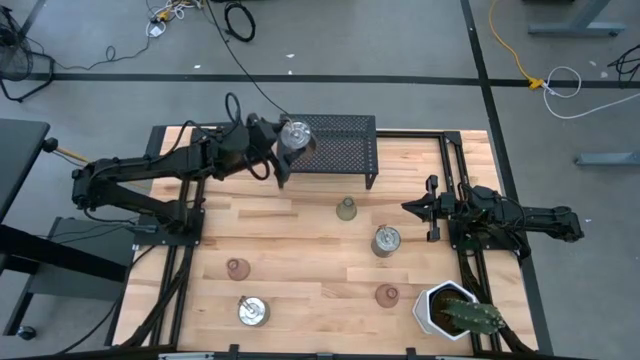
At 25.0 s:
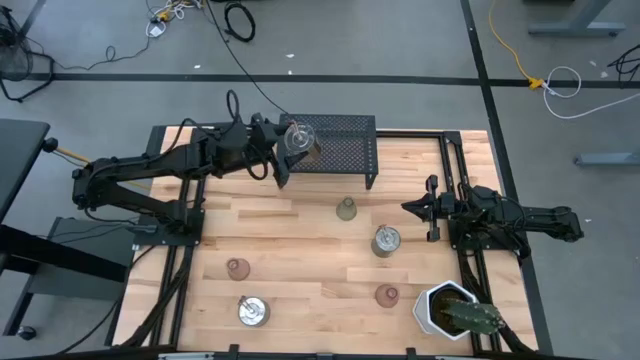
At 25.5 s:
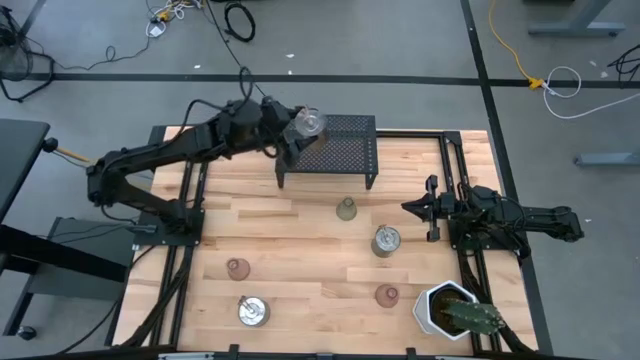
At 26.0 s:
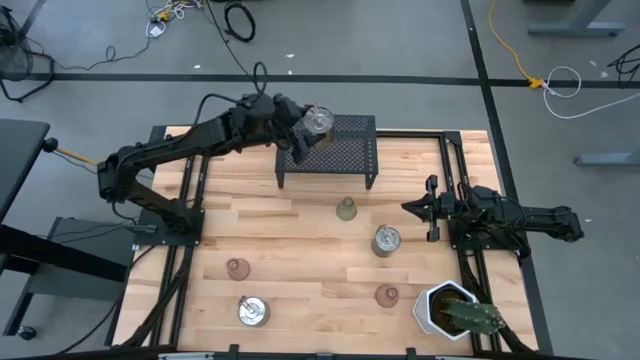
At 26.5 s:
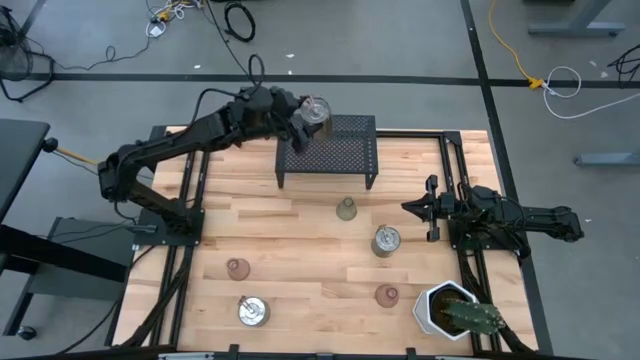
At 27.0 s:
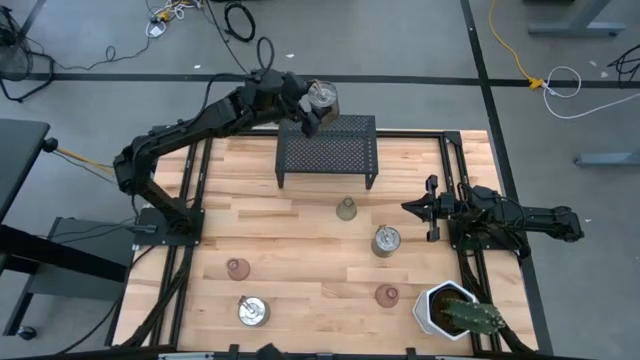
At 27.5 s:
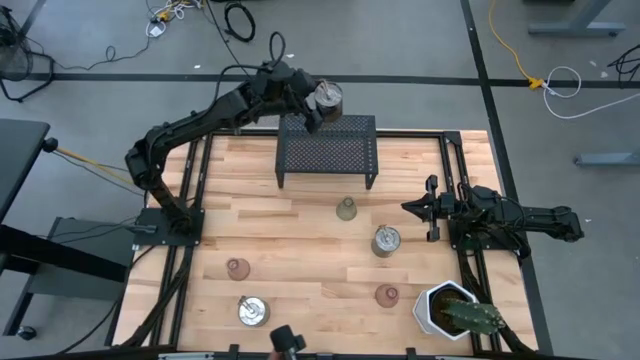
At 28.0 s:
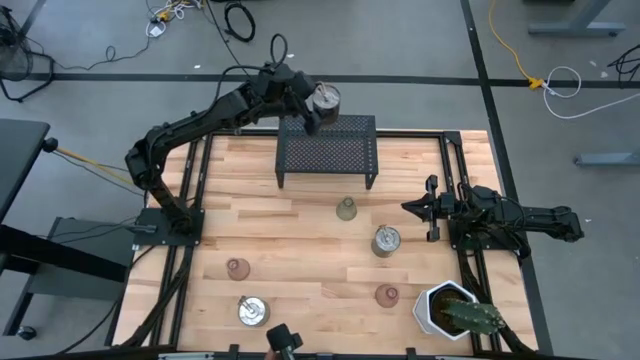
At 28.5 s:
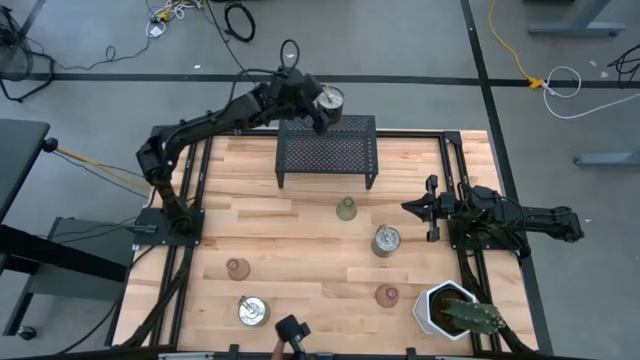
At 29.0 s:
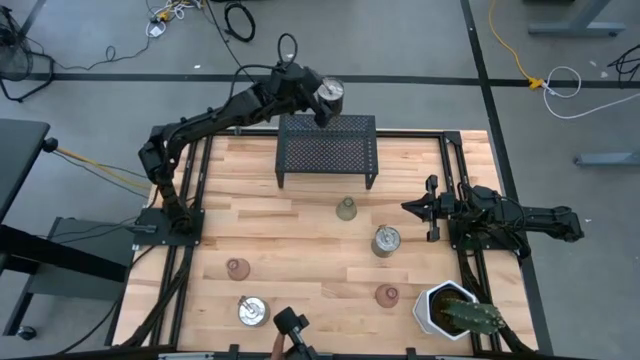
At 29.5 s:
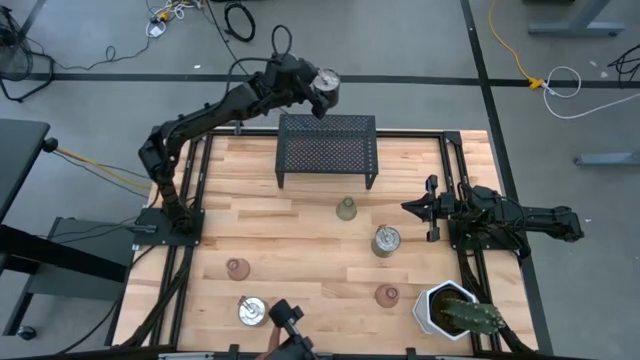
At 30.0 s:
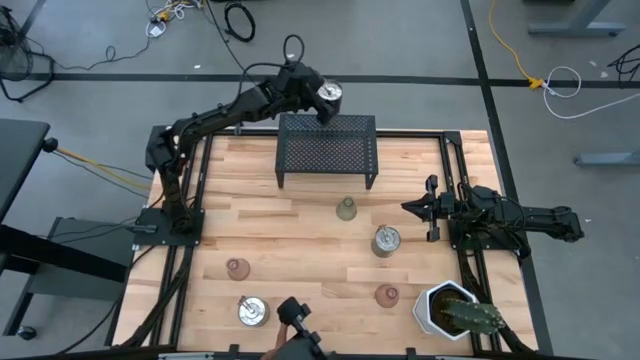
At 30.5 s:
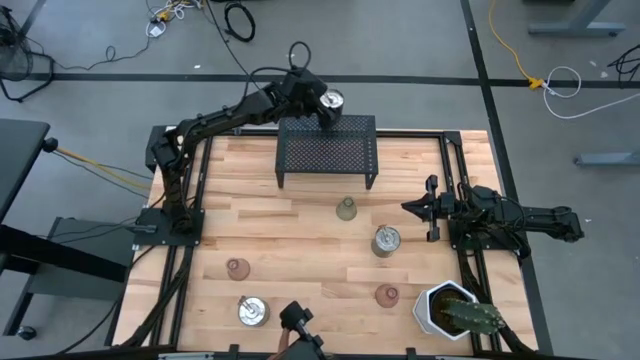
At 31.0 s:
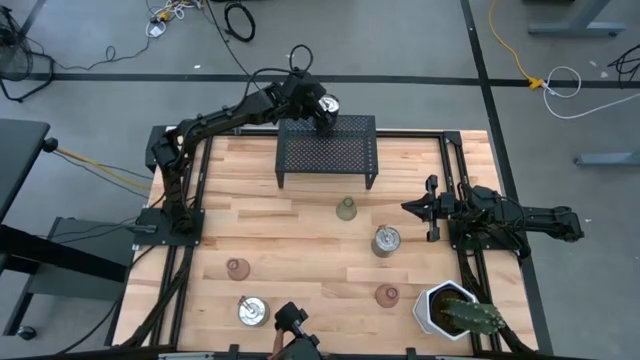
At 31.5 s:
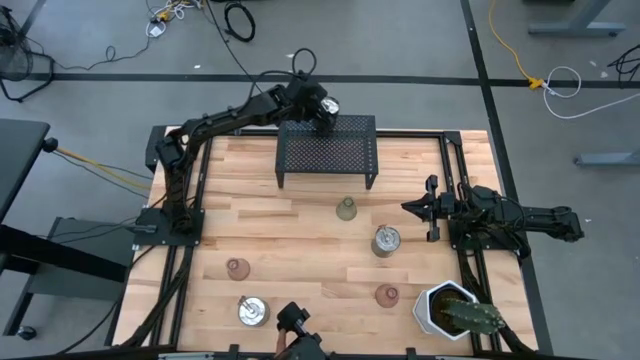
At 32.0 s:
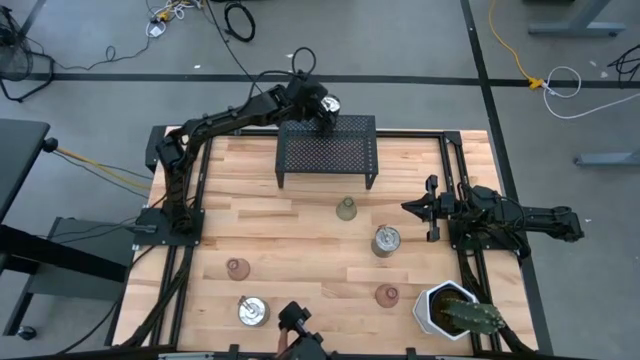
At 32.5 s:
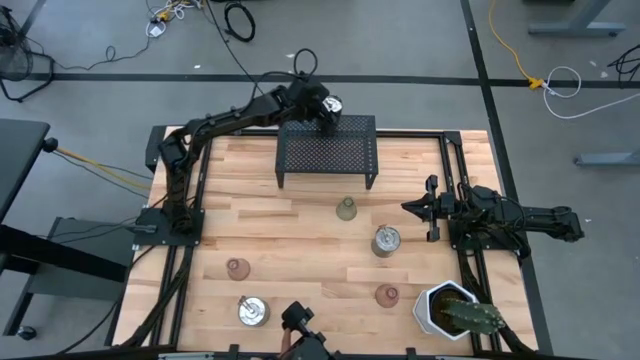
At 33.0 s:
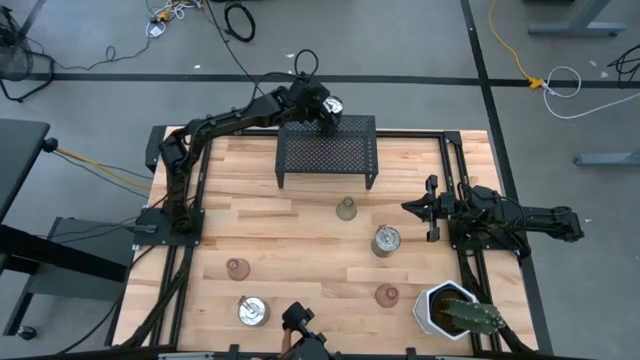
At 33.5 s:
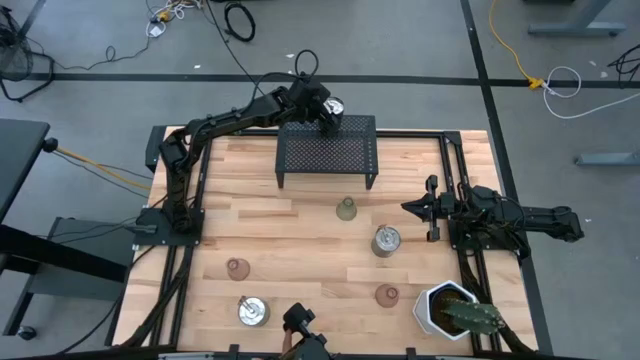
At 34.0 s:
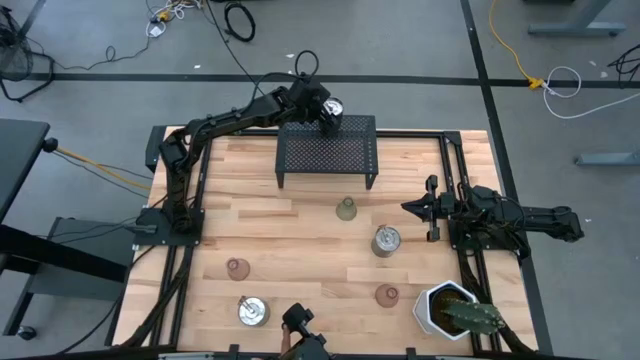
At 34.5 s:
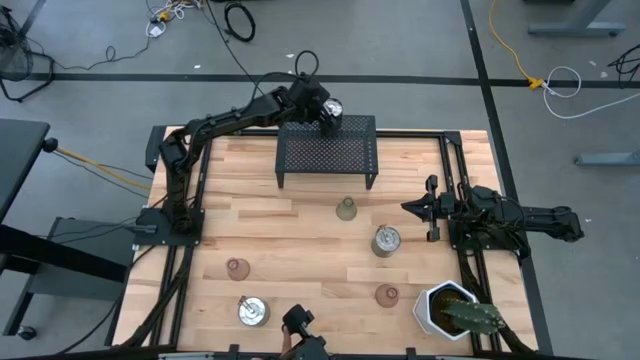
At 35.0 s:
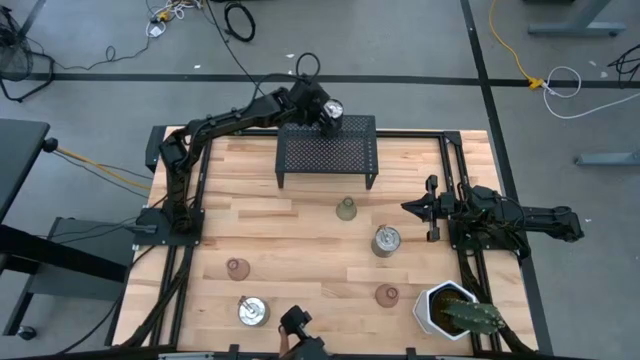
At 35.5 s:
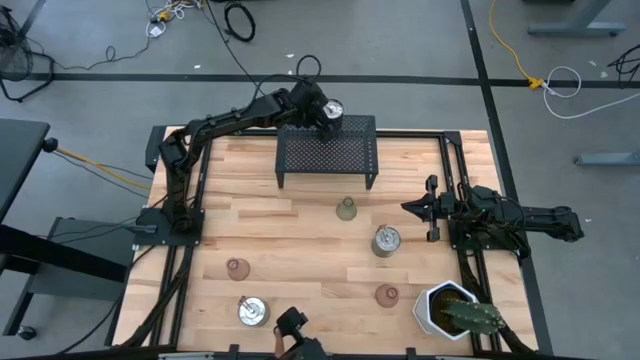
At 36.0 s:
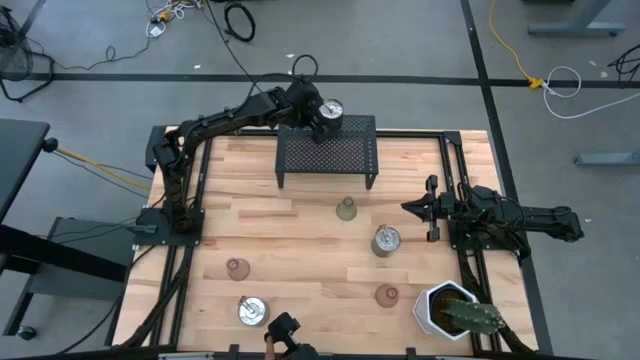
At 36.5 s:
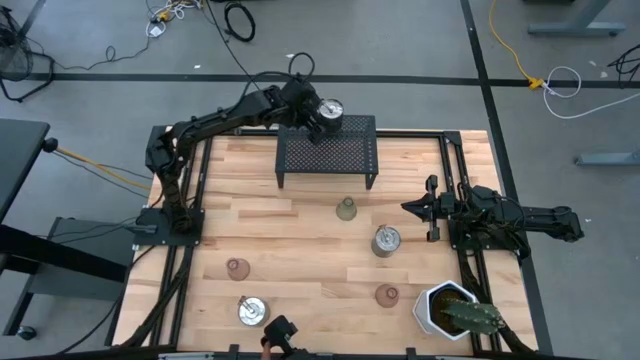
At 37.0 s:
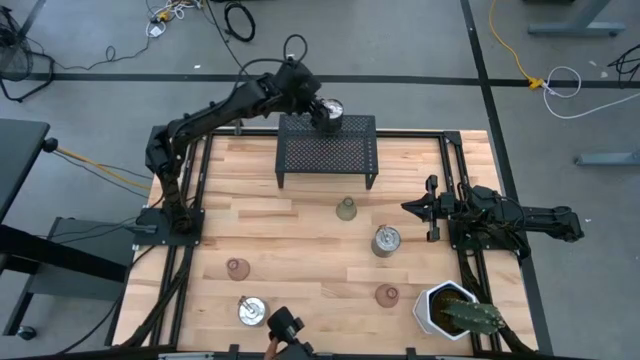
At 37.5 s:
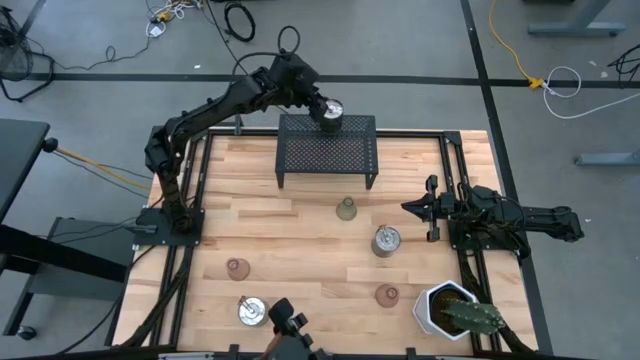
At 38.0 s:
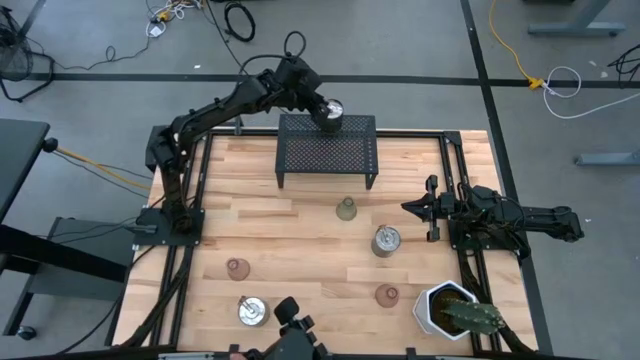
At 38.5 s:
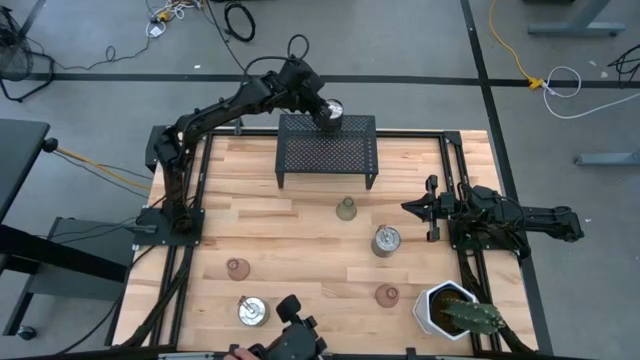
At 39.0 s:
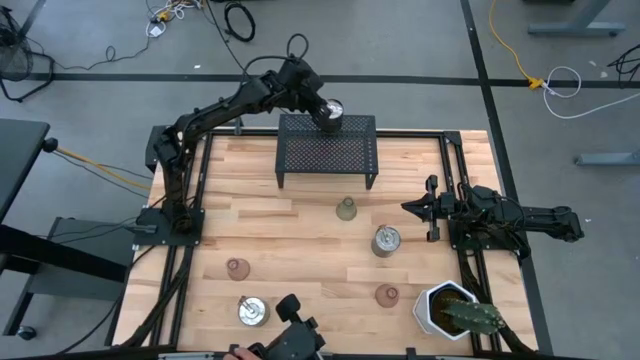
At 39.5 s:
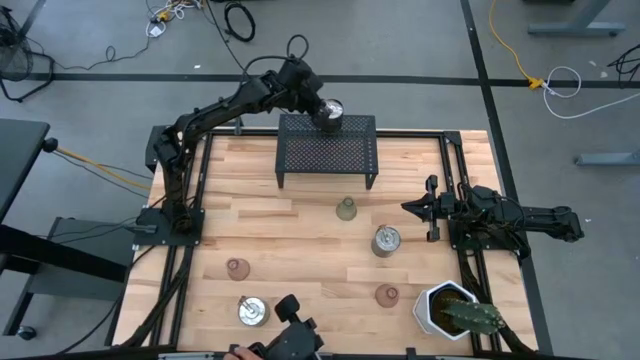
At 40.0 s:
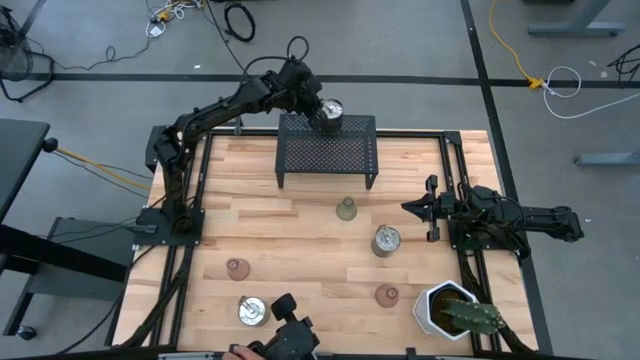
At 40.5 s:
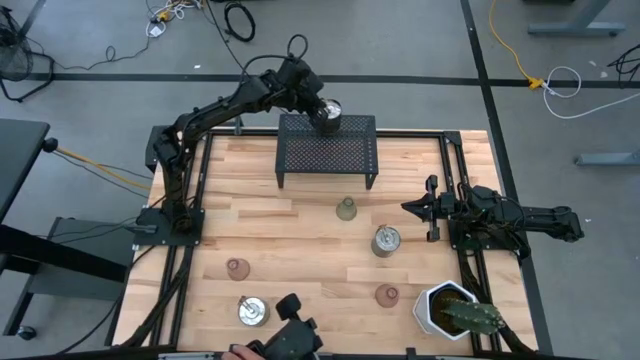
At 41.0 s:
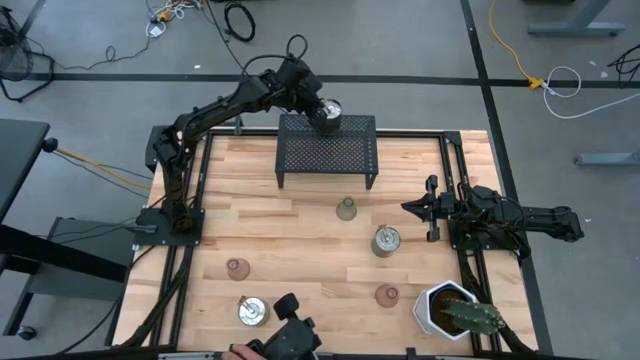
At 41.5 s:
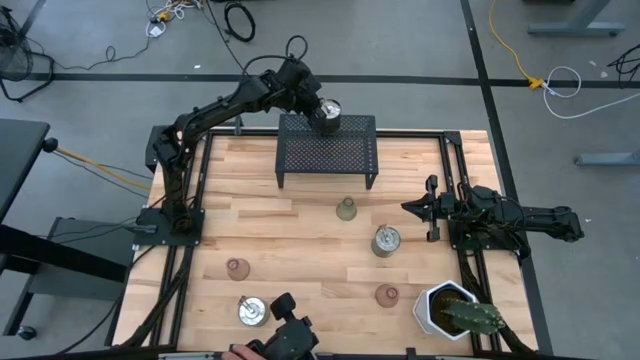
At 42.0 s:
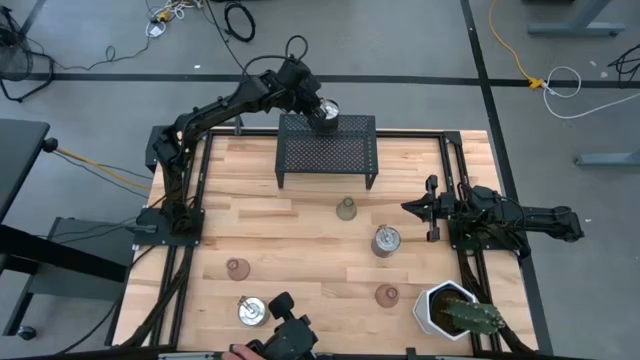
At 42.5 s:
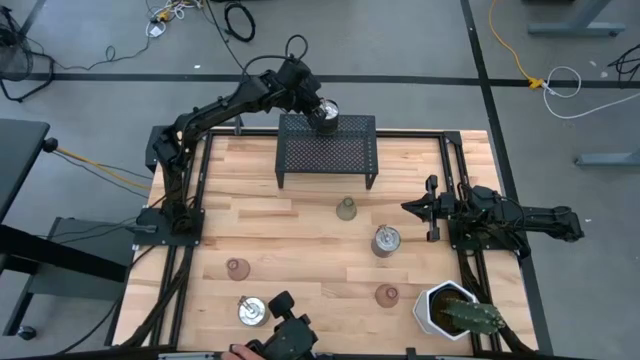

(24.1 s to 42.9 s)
Task: Pick & Place candle stick holders
Put the top left silver scented candle on the shelf

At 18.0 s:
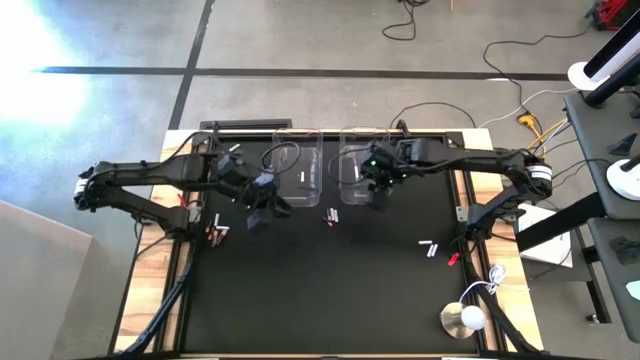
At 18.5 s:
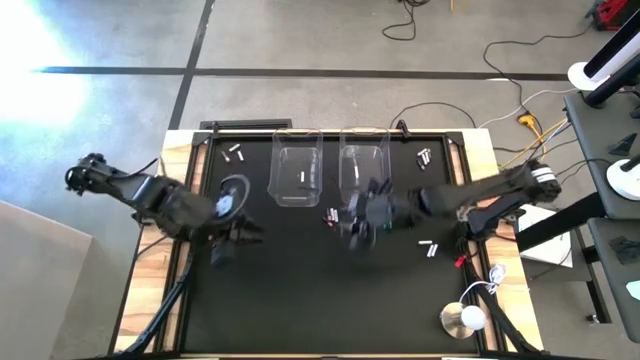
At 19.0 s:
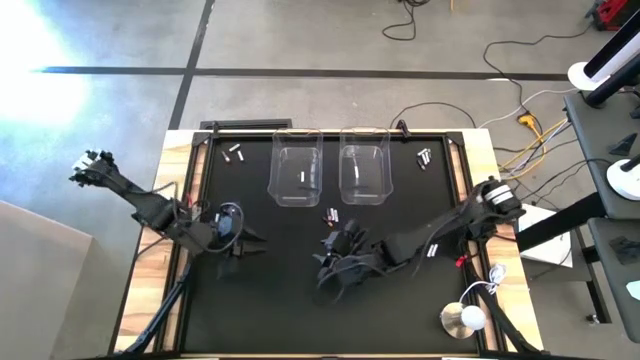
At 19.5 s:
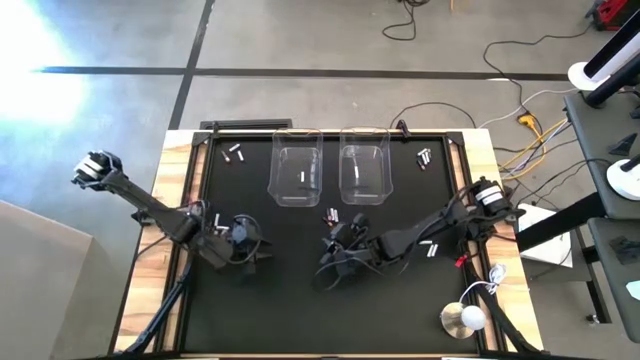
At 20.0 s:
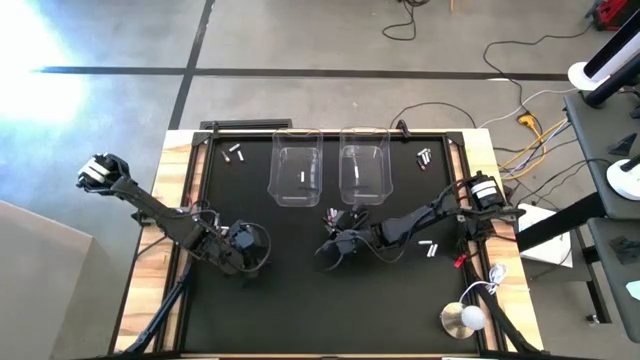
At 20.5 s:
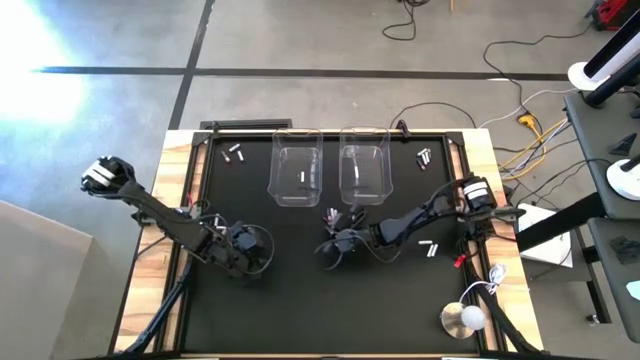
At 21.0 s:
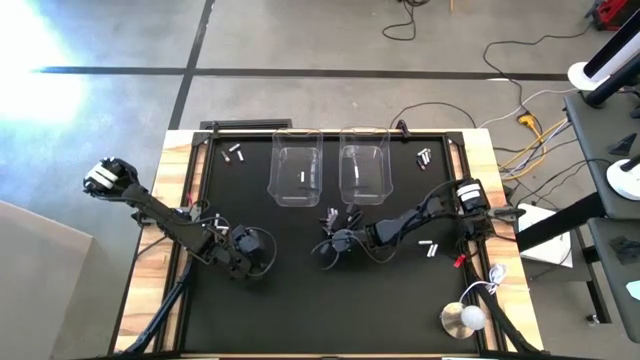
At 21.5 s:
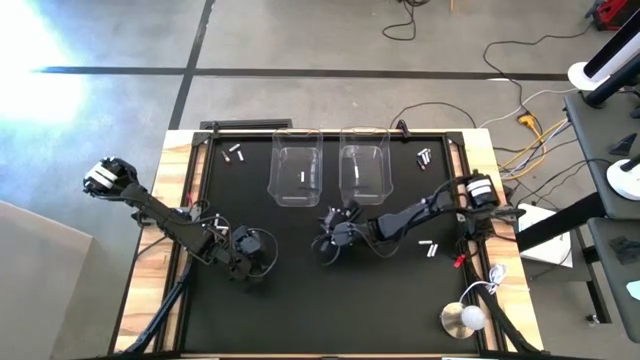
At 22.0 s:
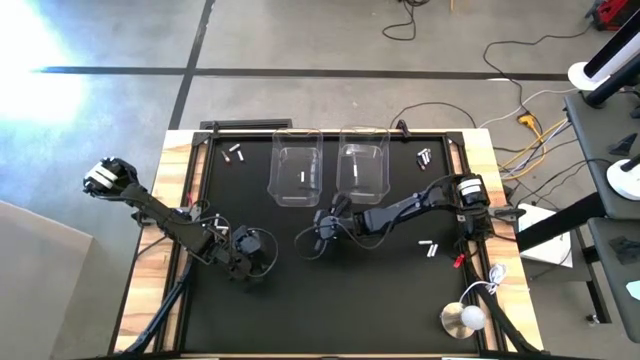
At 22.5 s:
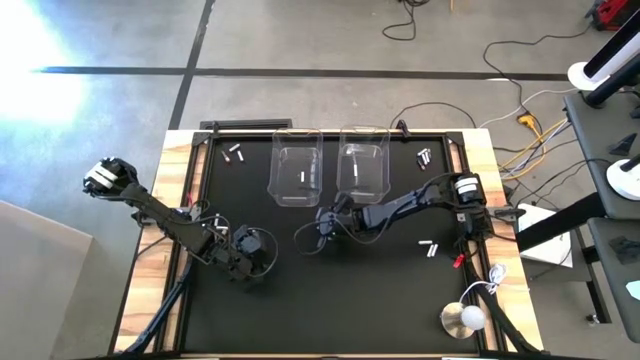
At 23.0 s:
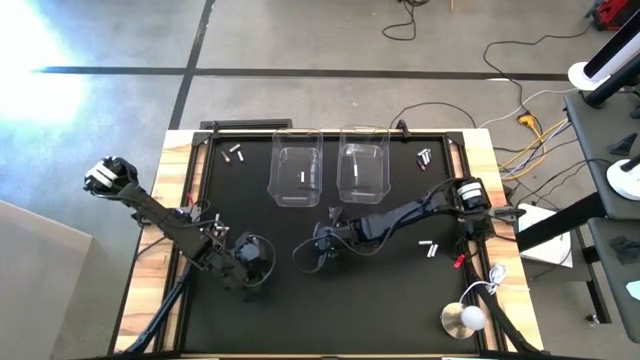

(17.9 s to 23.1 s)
Task: Sort batteries
Put the black battery into the left transparent bin
